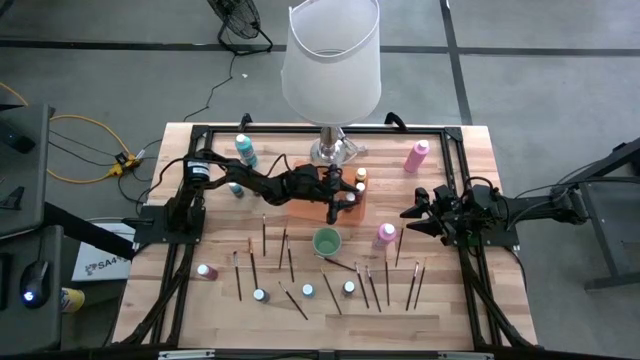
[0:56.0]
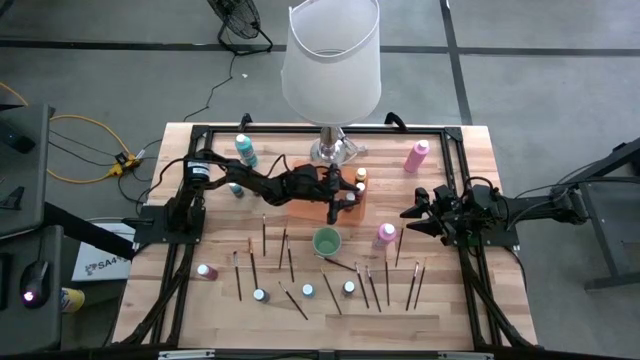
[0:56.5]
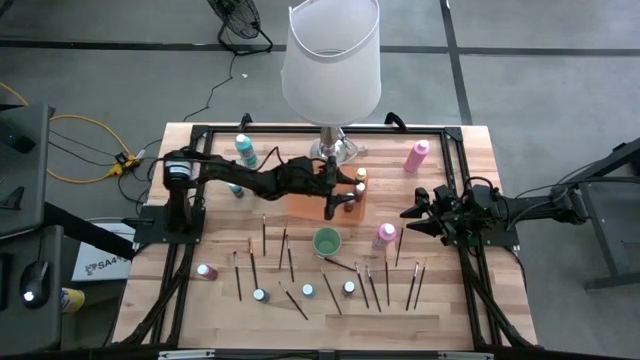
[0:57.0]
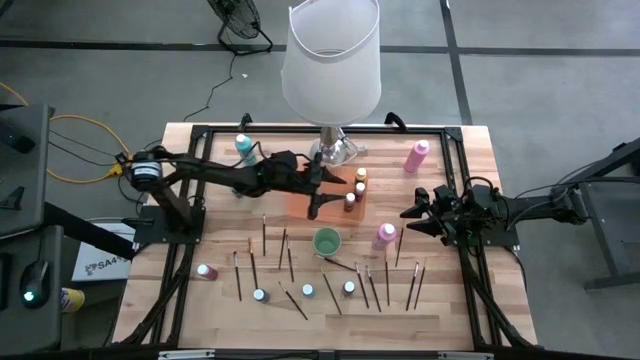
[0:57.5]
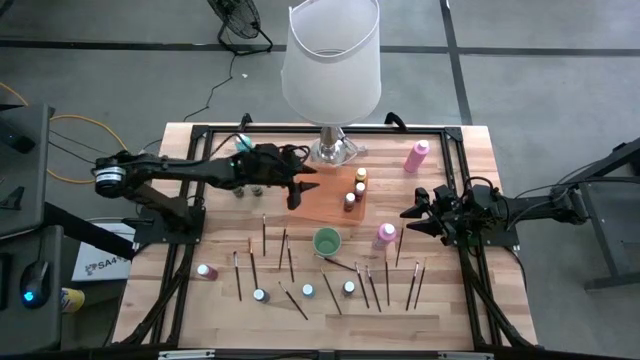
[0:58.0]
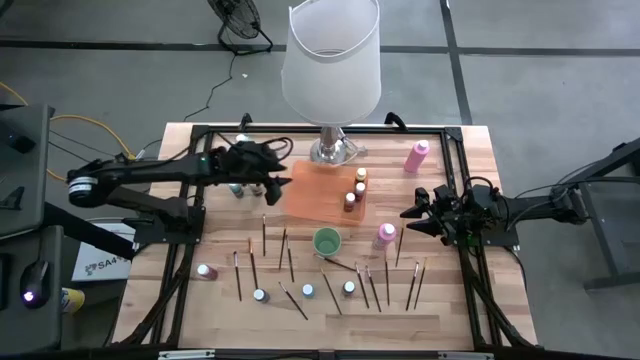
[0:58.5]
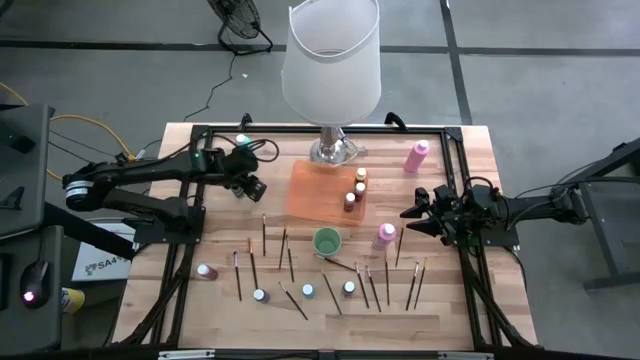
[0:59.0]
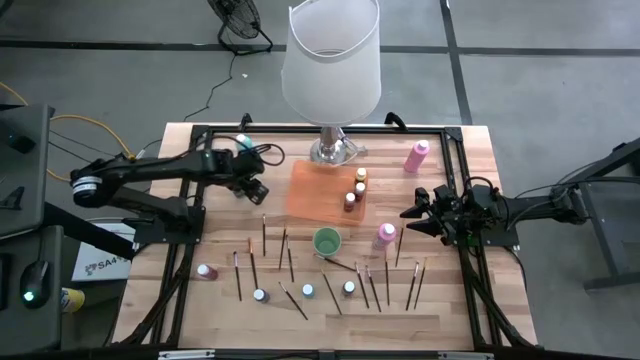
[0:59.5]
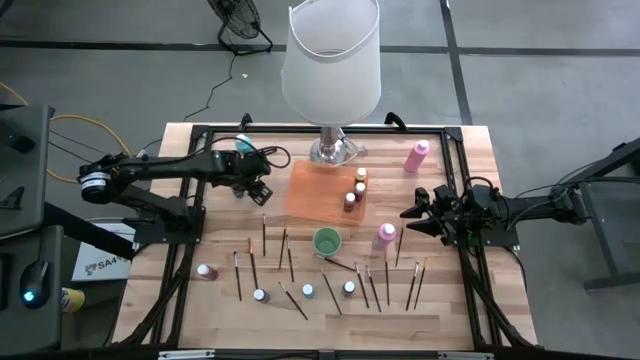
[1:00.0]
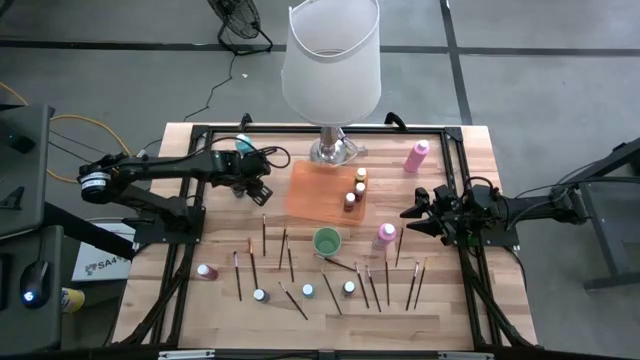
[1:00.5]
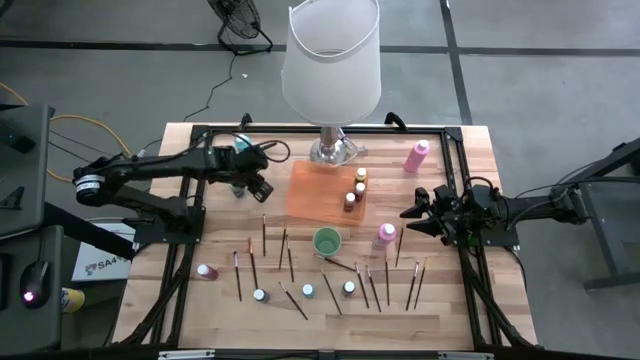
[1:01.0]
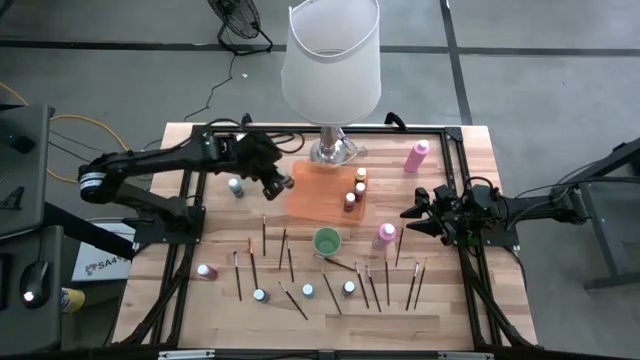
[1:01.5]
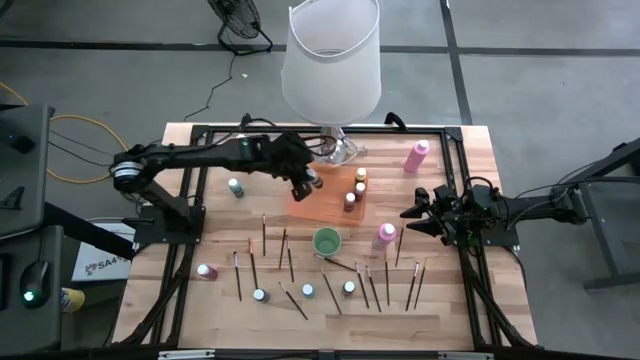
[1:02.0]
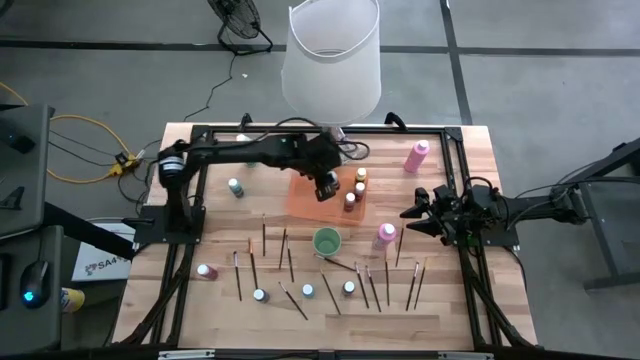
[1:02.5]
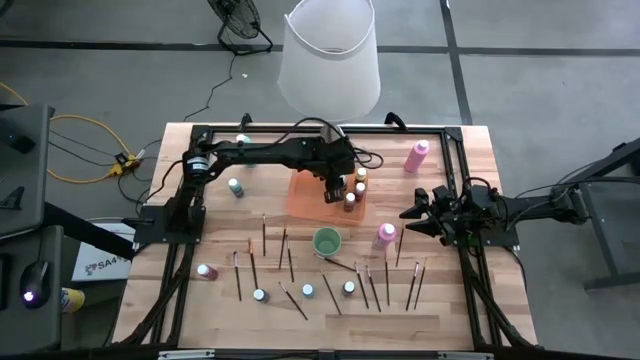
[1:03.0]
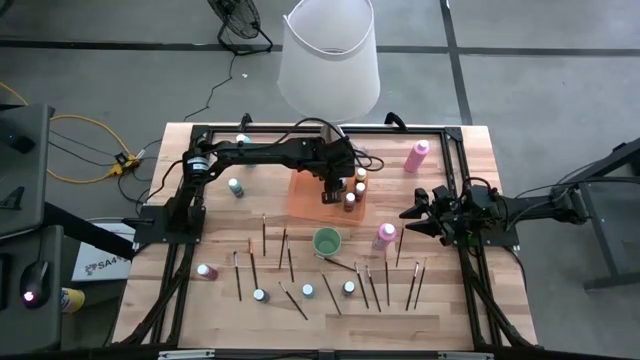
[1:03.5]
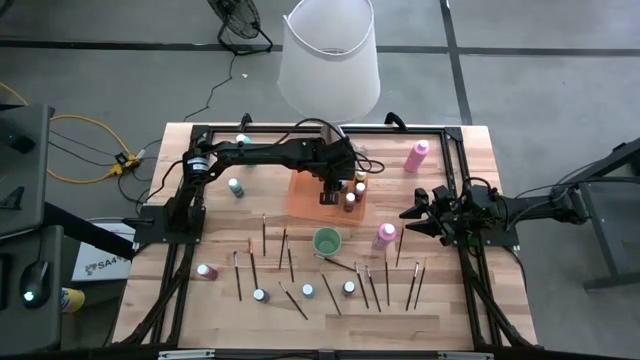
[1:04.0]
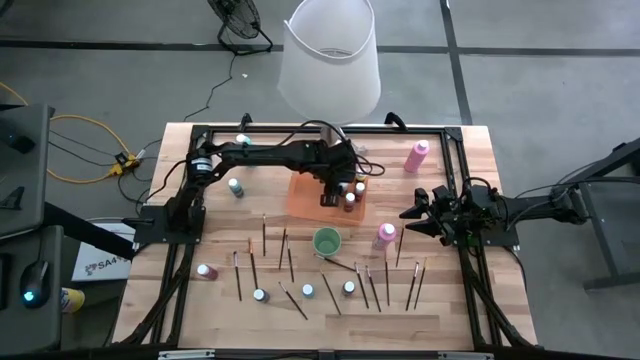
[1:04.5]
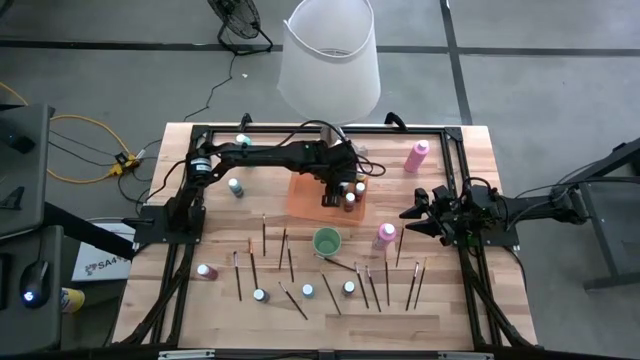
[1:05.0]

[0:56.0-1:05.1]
Task: Pick & Place Paint Supplies
Put the small white paint bottle into the orange bin

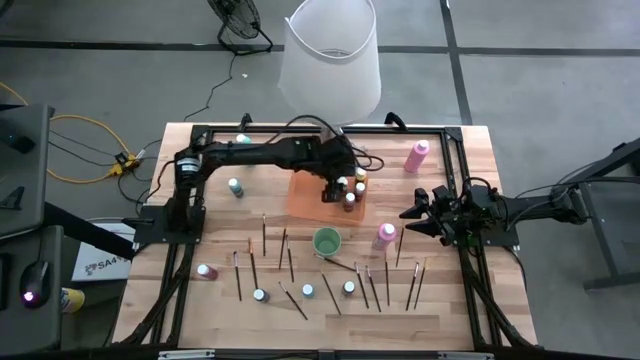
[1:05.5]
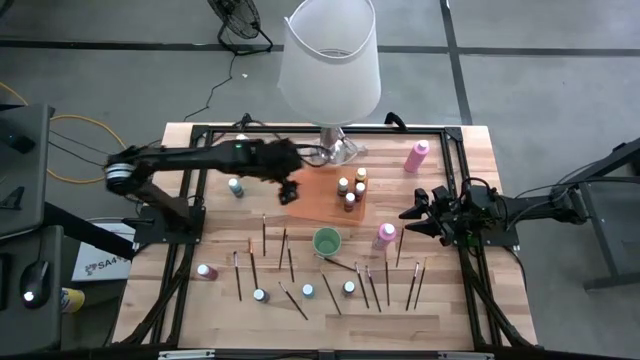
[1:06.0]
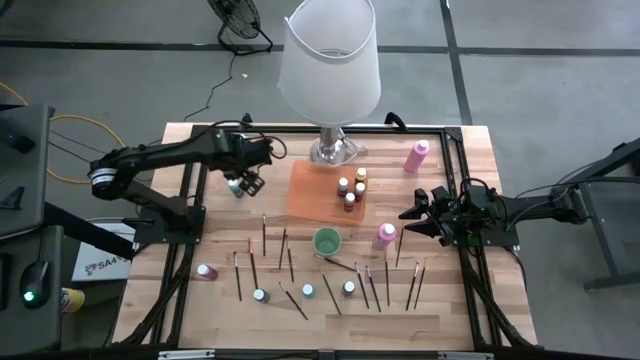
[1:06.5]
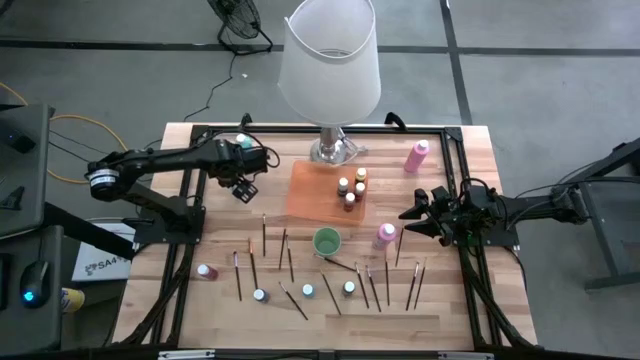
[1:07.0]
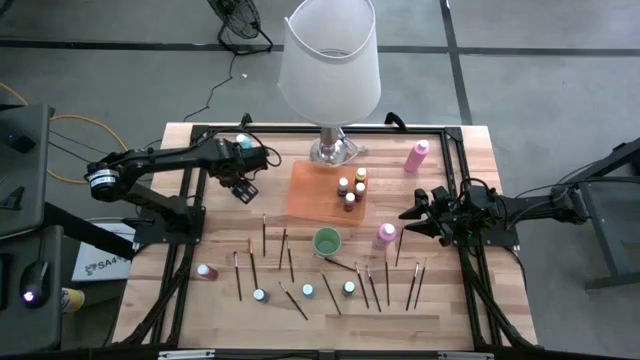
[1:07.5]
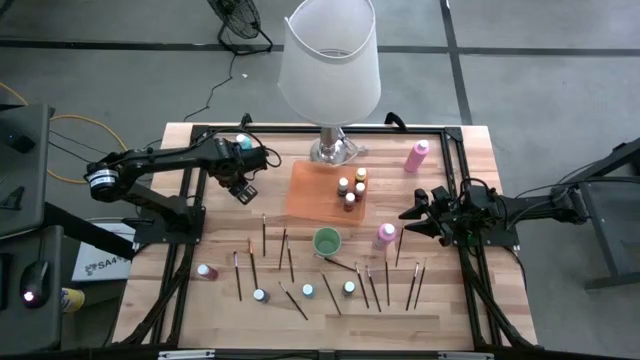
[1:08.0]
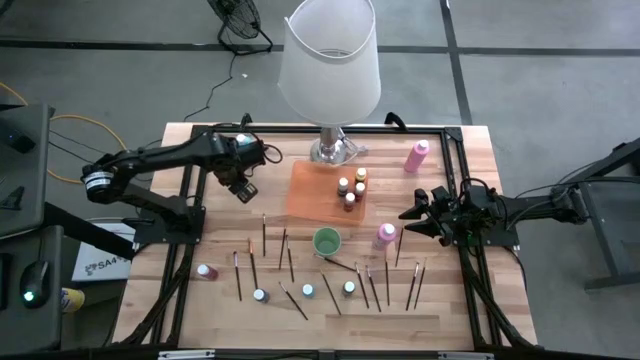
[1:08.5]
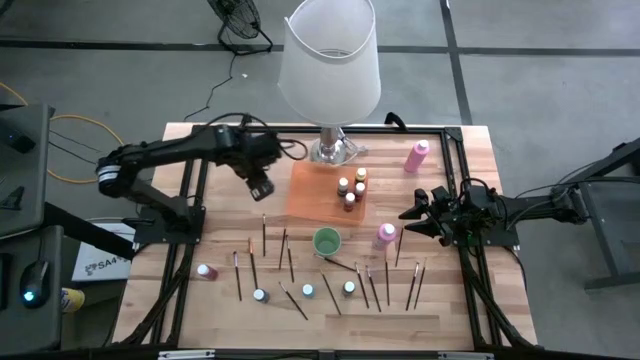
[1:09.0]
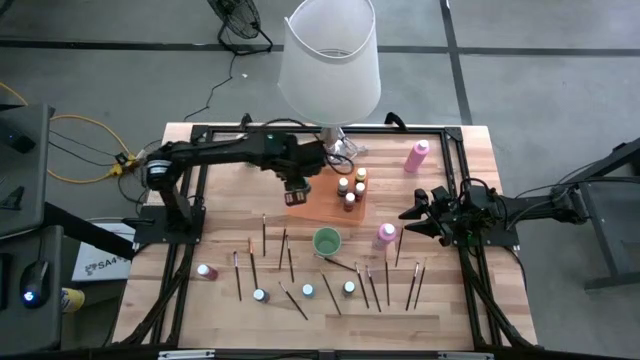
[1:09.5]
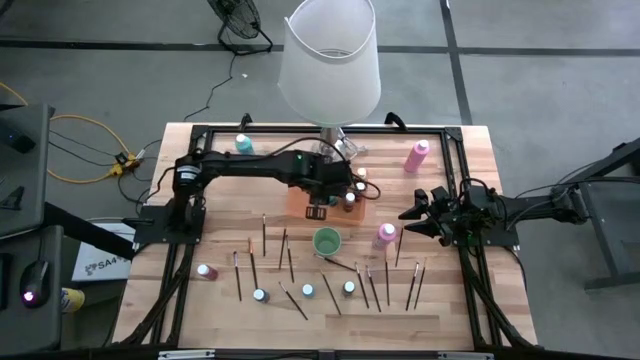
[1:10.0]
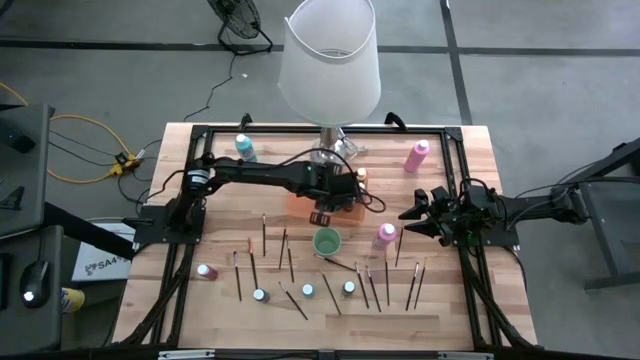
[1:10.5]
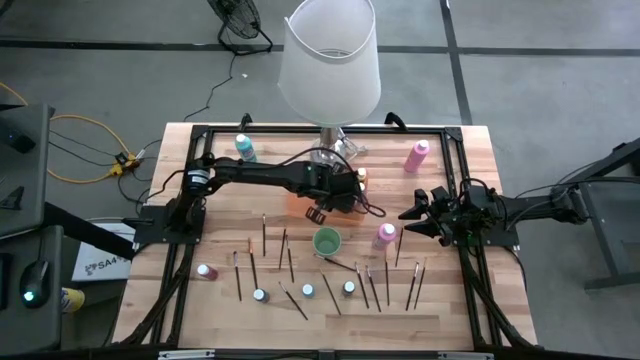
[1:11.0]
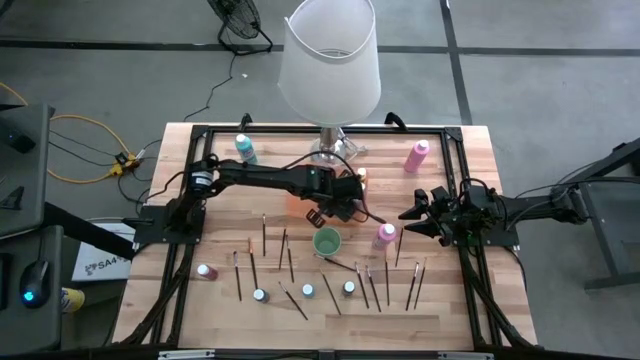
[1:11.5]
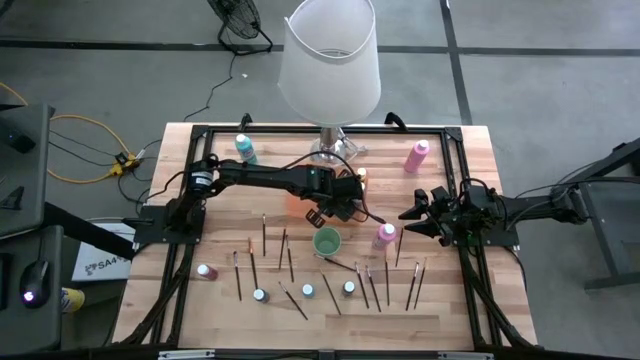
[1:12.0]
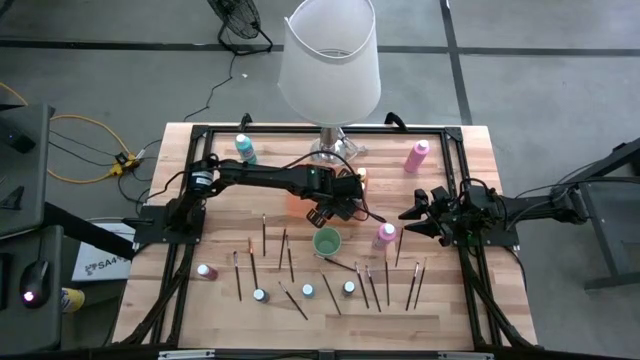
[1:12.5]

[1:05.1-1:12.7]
Put the top small light blue paint bottle into the orange bin

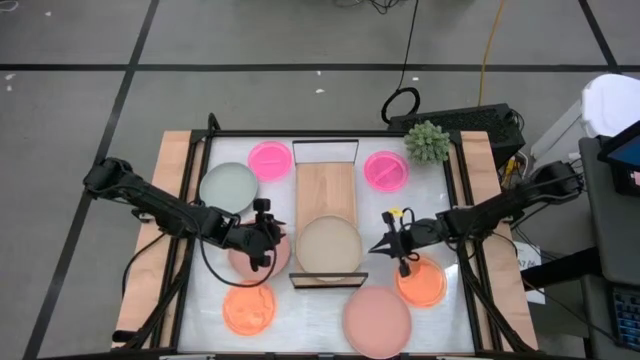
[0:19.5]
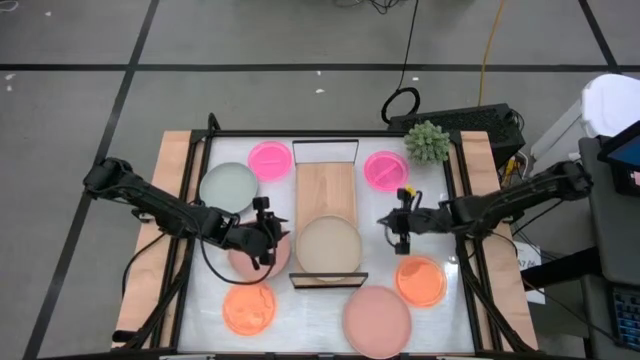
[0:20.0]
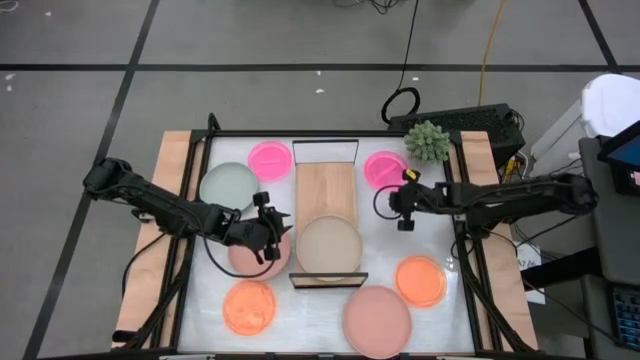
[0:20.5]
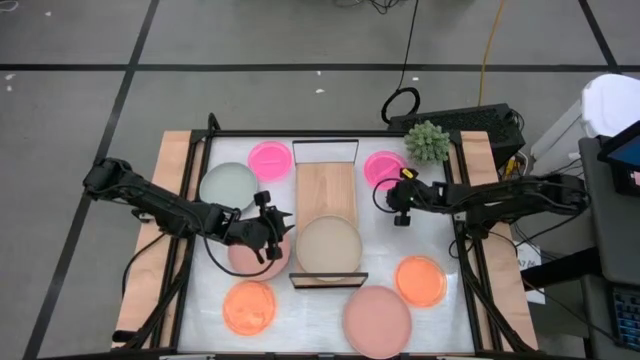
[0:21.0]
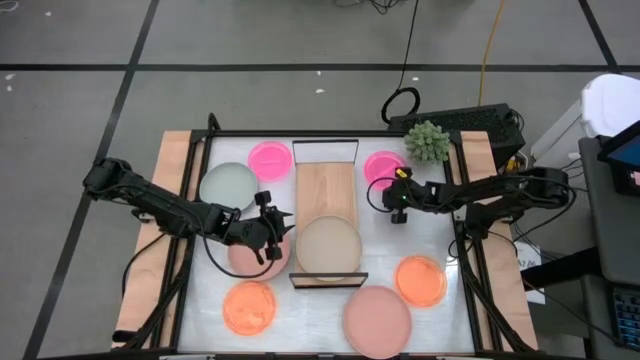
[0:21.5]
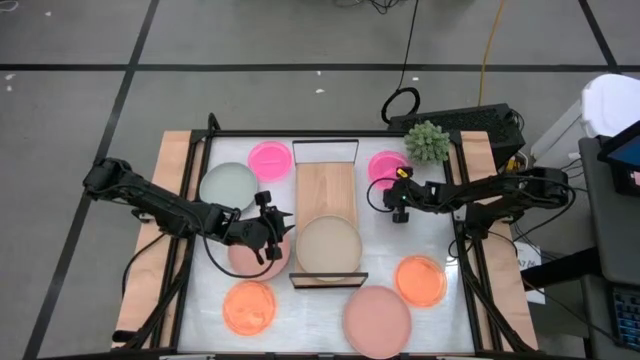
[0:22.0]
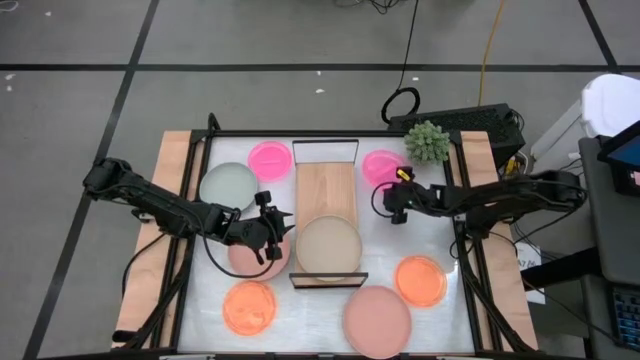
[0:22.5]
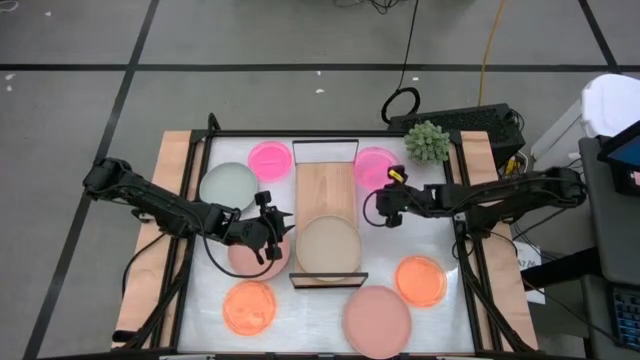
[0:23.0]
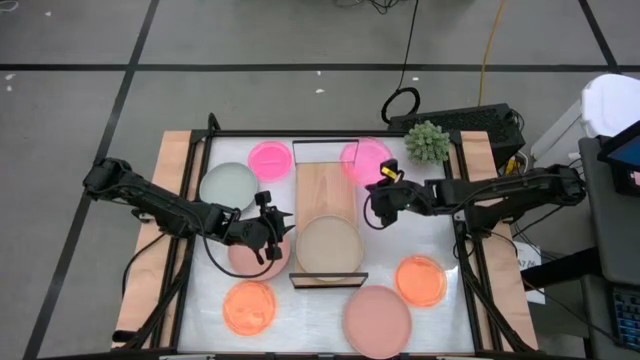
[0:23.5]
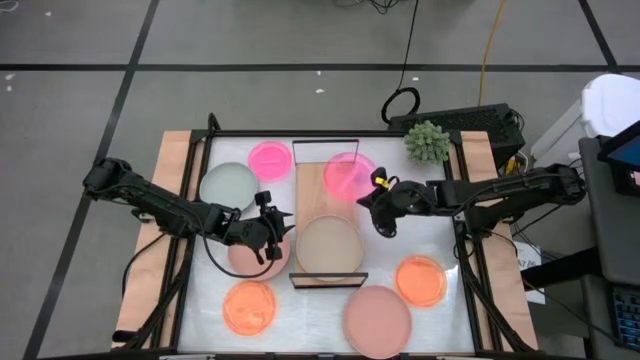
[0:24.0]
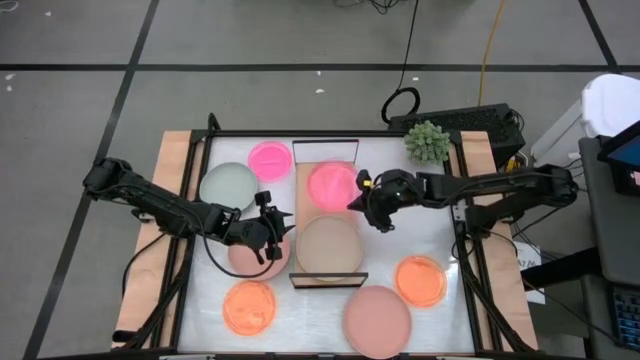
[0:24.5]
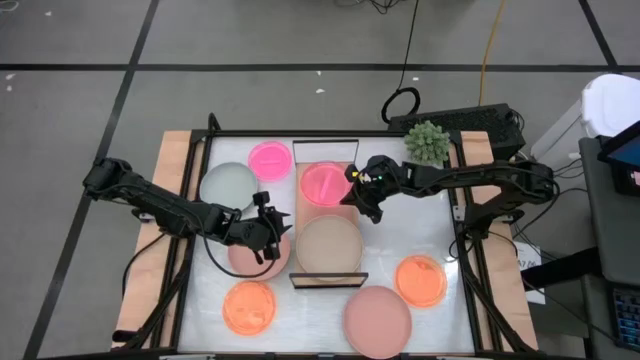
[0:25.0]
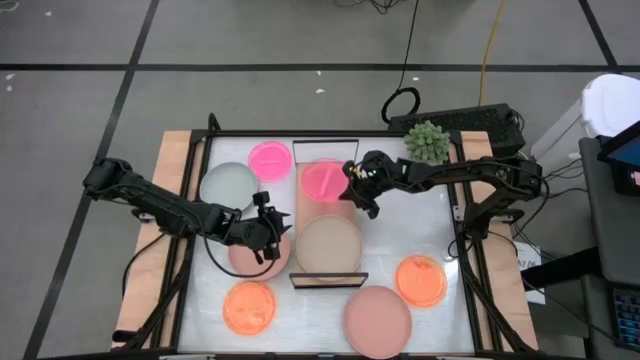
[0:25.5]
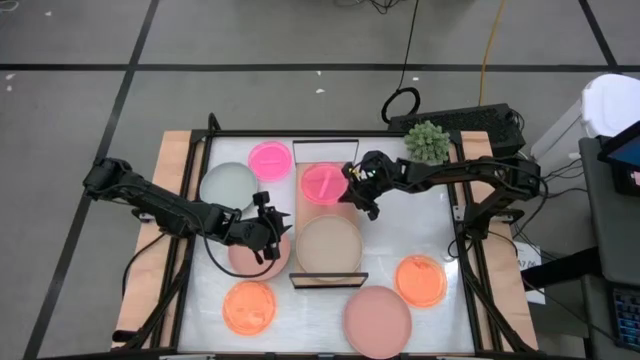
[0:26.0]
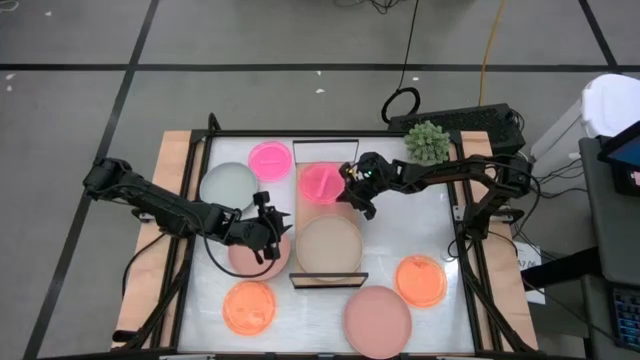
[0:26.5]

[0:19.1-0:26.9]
Task: Place and stack plates onto a shelf
Put the right pink plate on the shelf
